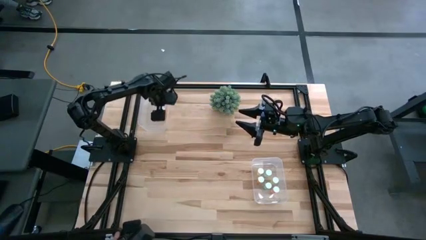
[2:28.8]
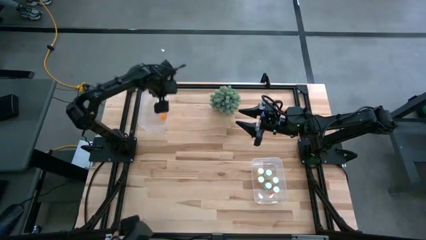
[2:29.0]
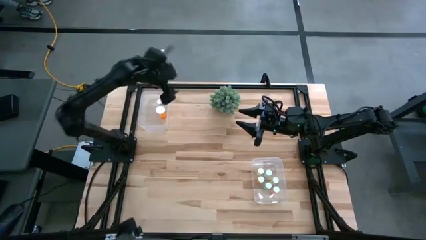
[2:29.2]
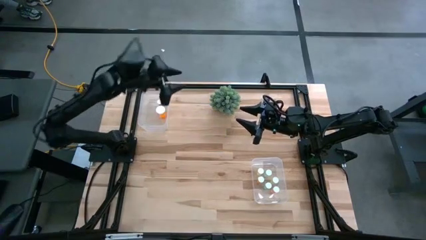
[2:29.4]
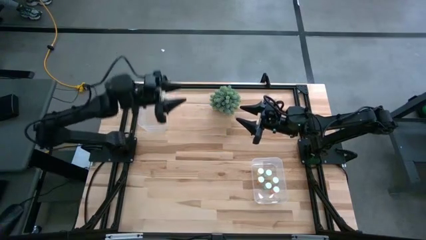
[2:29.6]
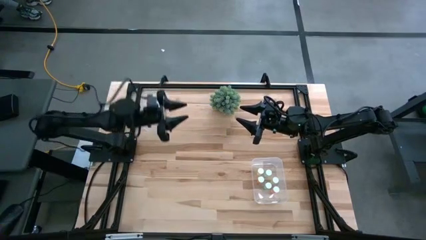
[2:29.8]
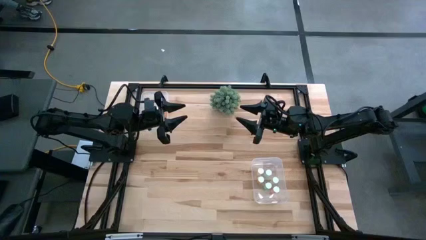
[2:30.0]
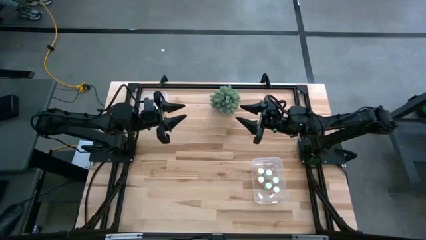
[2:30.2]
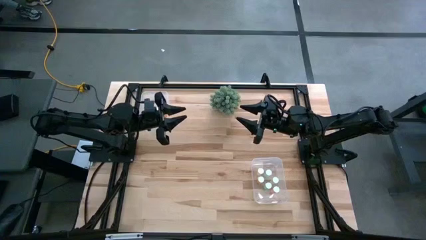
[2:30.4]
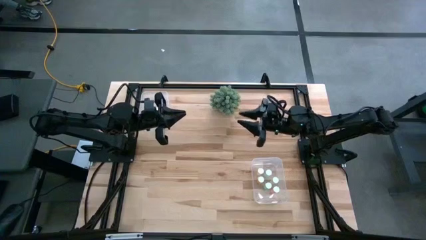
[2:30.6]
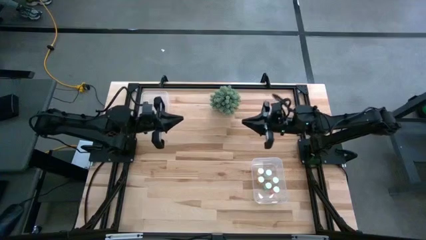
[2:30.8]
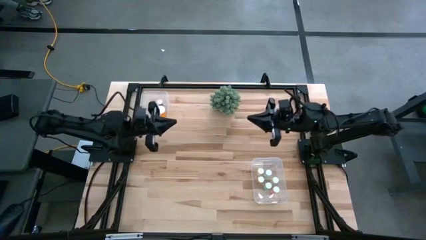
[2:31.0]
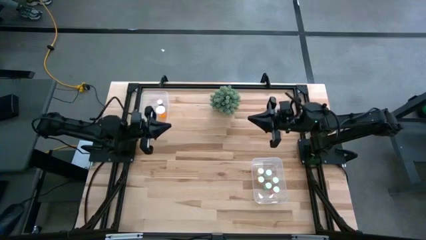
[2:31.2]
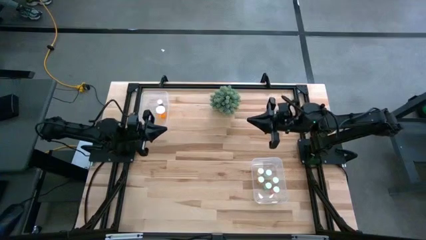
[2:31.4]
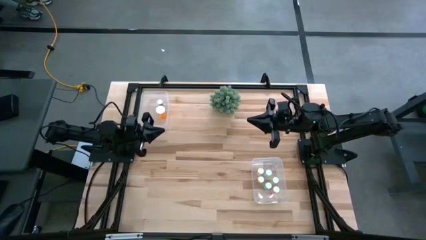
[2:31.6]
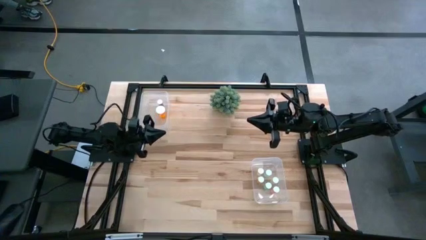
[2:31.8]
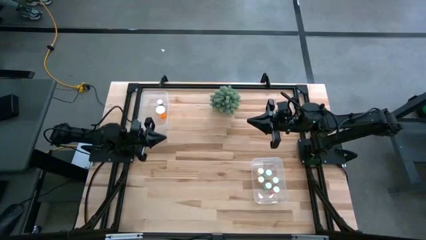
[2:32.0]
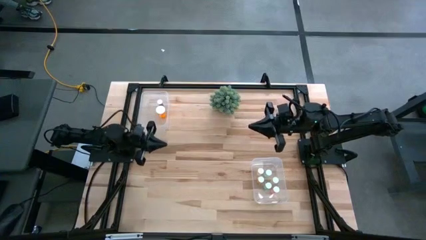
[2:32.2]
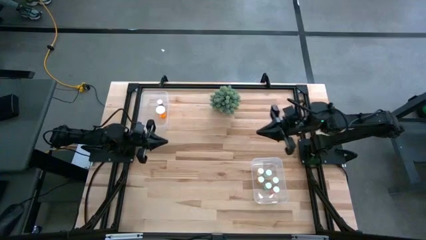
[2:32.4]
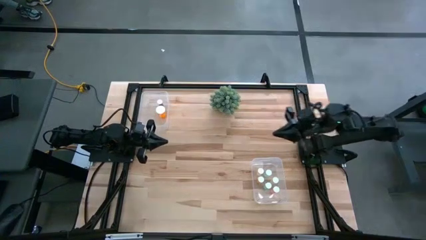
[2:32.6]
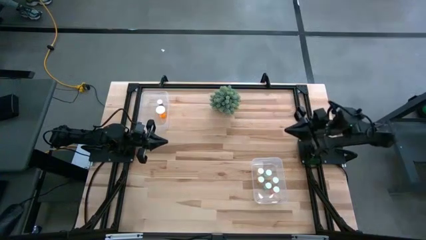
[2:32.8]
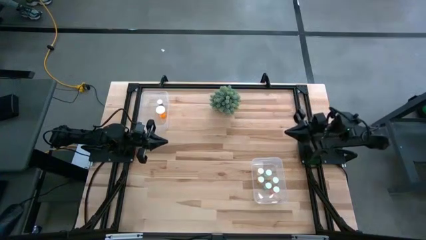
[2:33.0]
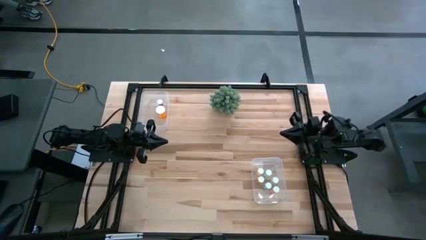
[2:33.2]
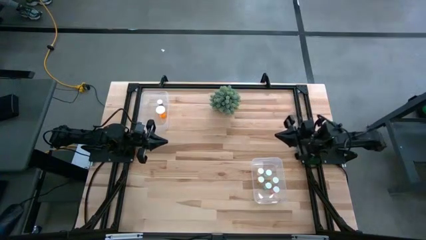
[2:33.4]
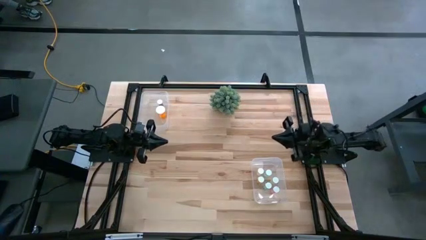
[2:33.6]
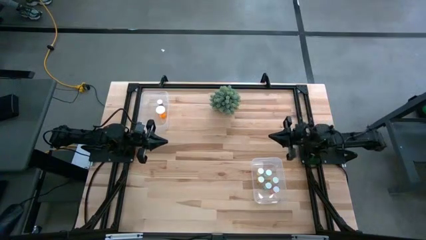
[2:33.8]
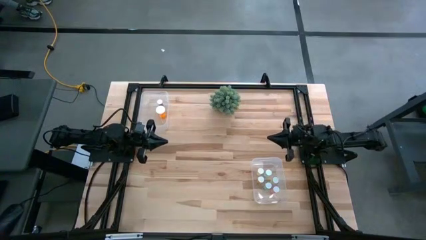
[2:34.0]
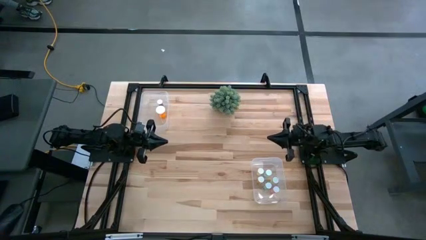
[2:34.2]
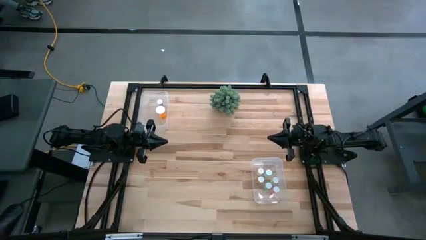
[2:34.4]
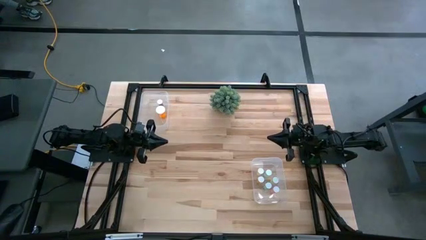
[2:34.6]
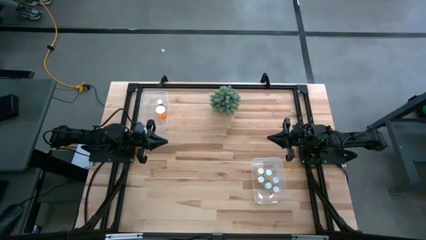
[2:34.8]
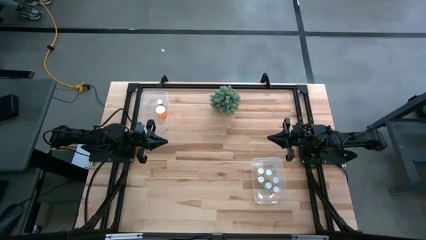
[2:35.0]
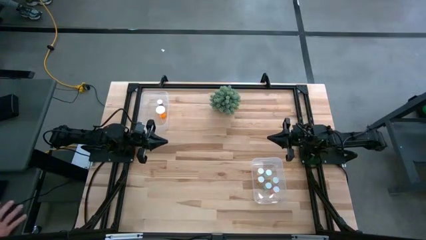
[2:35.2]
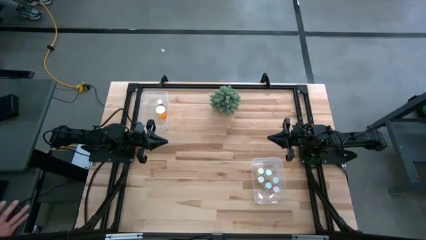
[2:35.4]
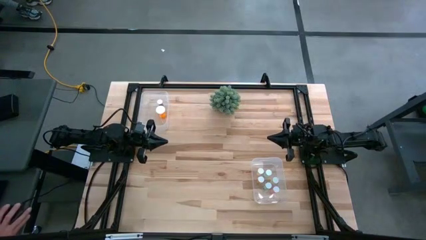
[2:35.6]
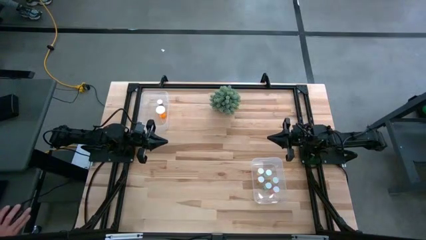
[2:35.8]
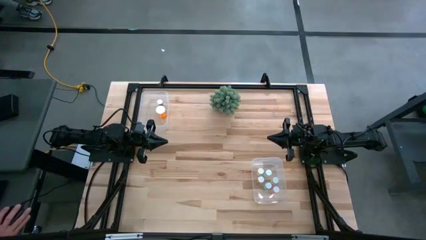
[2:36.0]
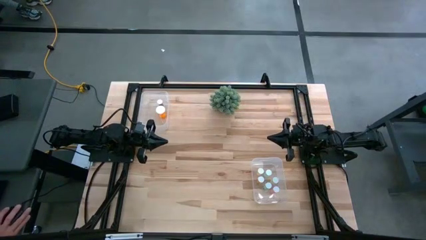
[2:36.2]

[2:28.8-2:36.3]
Task: Pick and place medicine bottles into bin by pill shape (circle, oval)
Return to Home Position

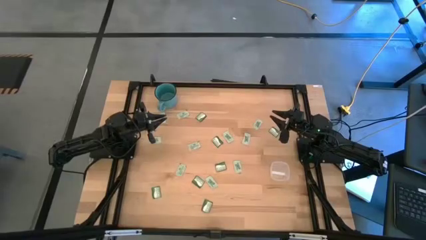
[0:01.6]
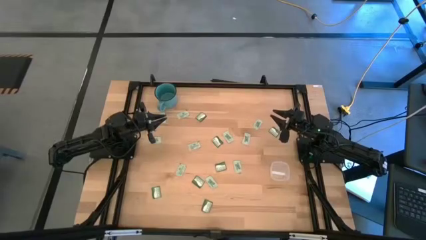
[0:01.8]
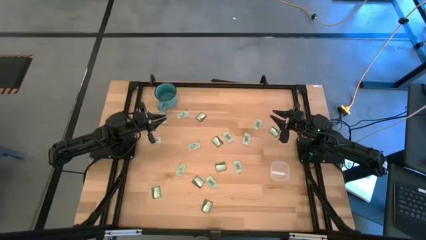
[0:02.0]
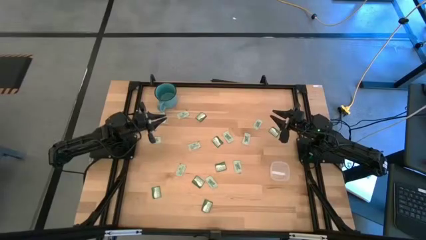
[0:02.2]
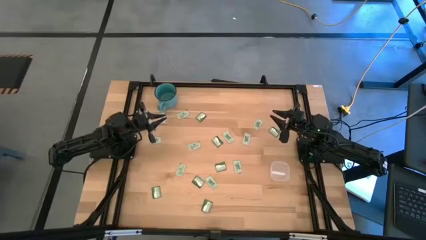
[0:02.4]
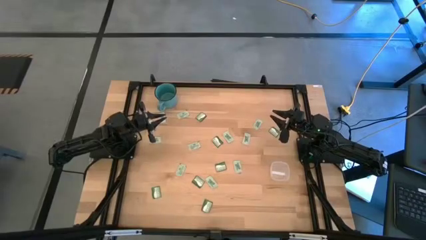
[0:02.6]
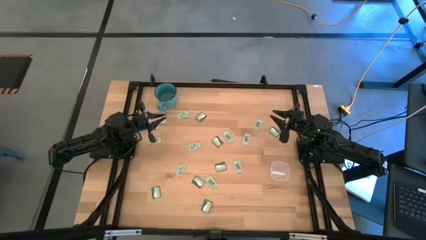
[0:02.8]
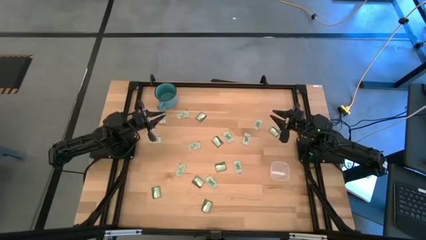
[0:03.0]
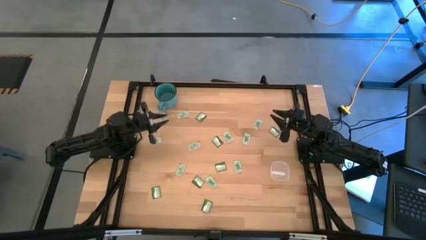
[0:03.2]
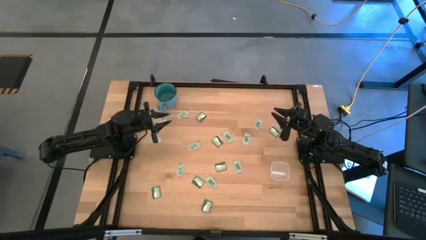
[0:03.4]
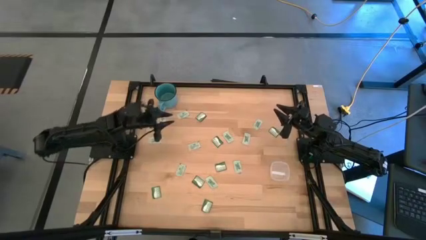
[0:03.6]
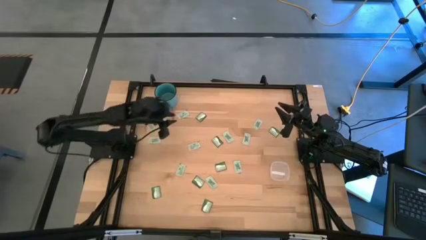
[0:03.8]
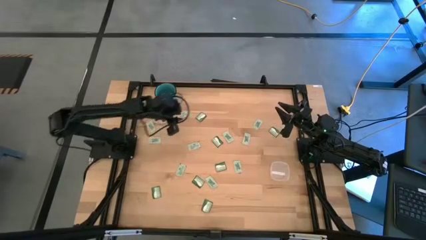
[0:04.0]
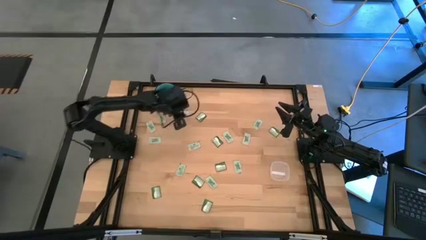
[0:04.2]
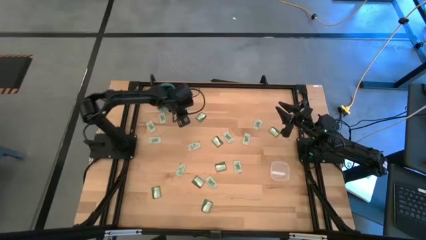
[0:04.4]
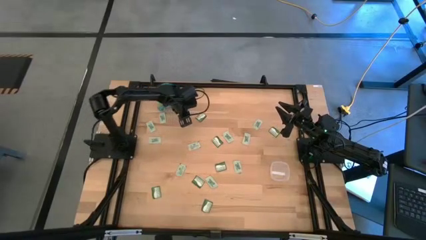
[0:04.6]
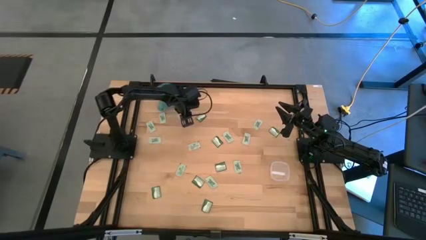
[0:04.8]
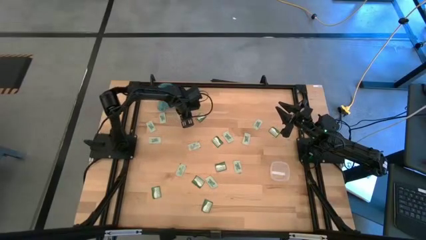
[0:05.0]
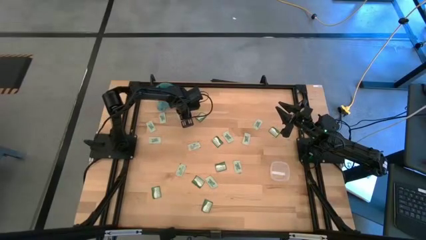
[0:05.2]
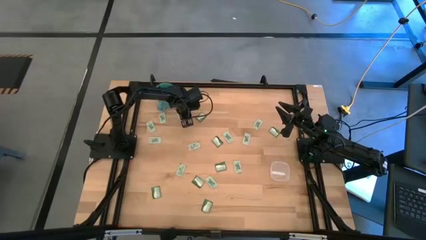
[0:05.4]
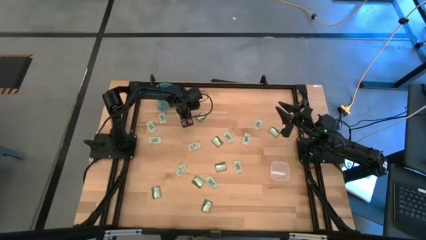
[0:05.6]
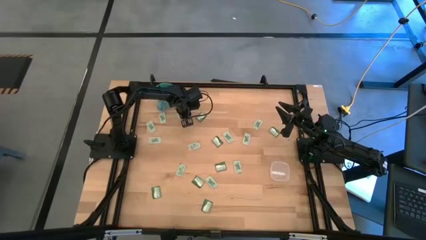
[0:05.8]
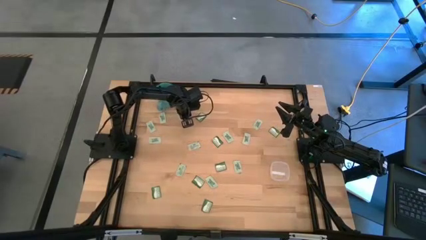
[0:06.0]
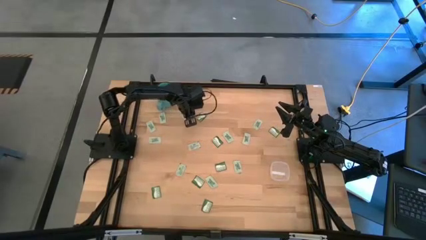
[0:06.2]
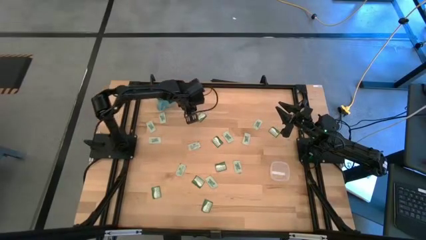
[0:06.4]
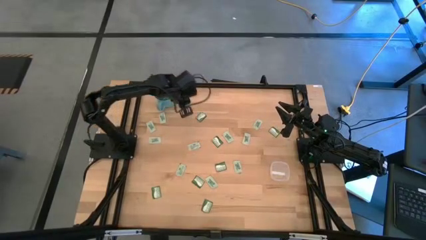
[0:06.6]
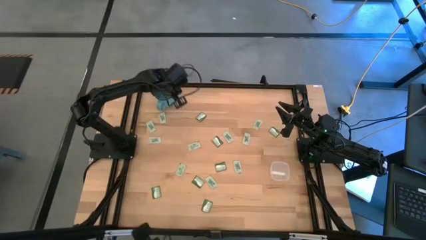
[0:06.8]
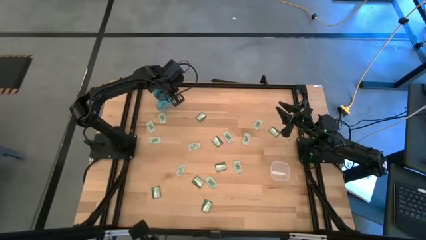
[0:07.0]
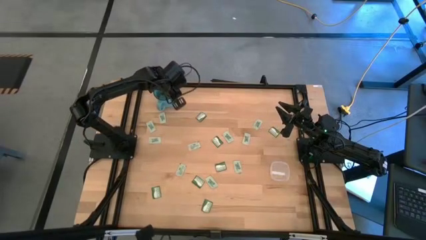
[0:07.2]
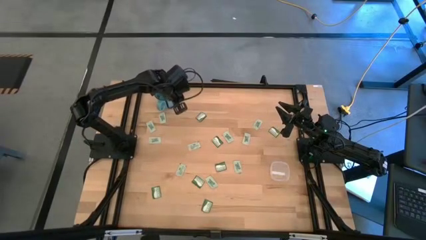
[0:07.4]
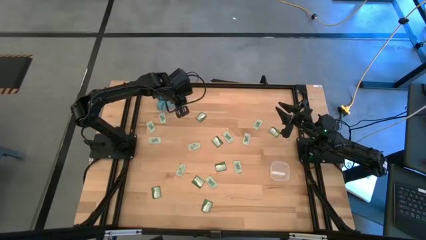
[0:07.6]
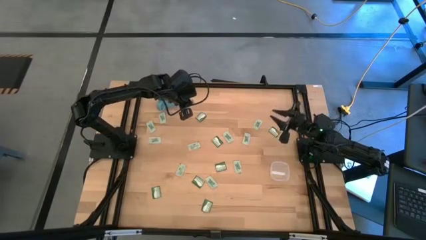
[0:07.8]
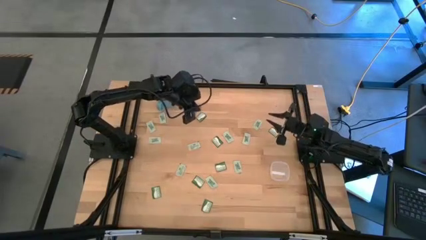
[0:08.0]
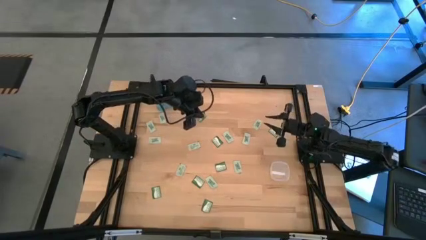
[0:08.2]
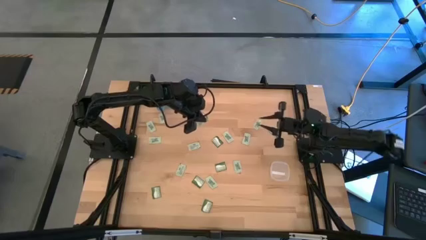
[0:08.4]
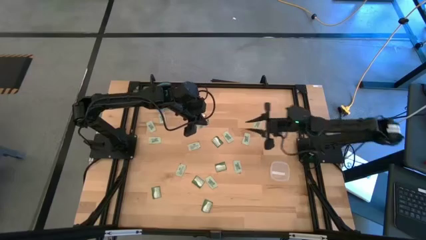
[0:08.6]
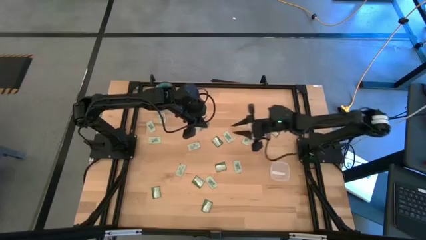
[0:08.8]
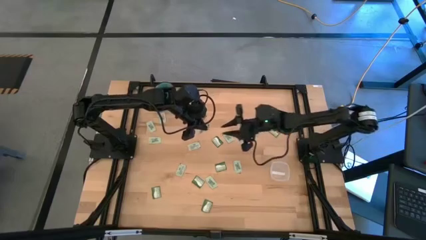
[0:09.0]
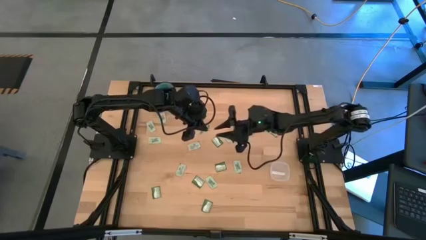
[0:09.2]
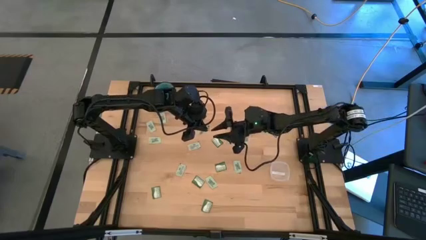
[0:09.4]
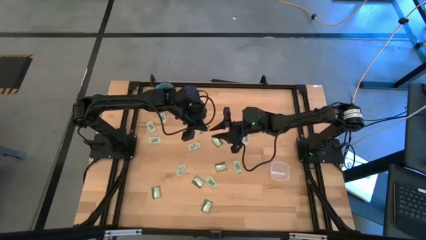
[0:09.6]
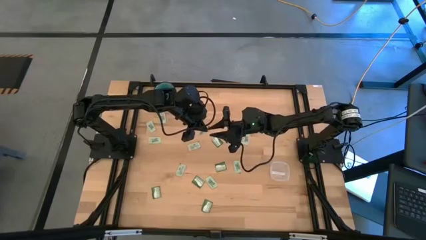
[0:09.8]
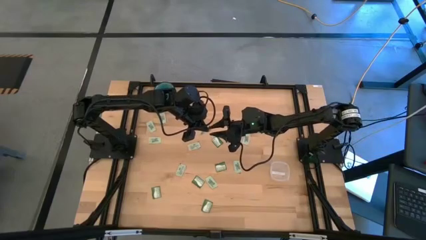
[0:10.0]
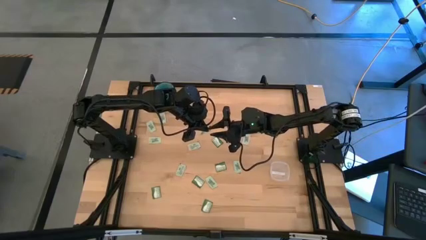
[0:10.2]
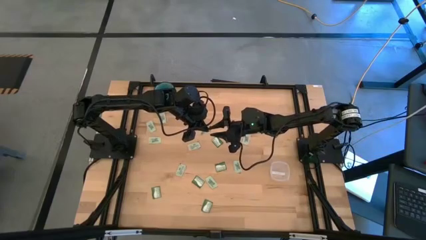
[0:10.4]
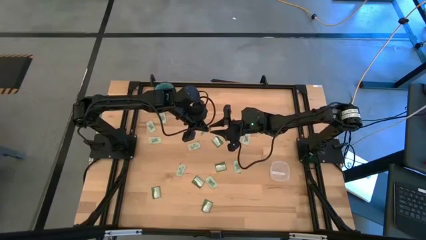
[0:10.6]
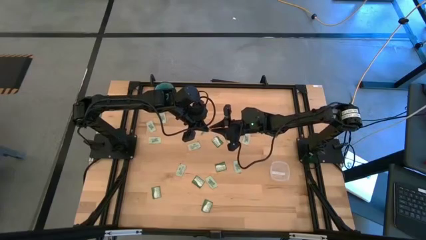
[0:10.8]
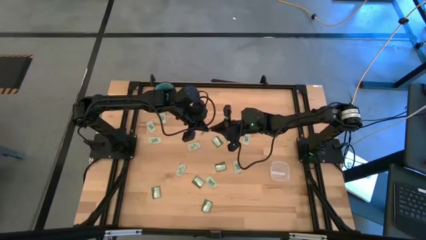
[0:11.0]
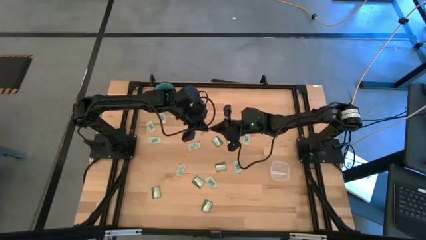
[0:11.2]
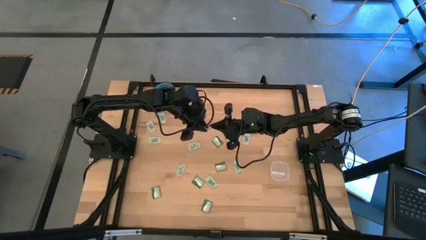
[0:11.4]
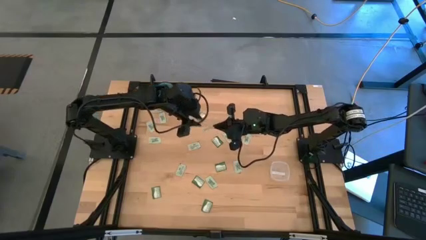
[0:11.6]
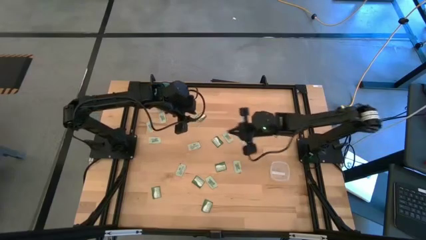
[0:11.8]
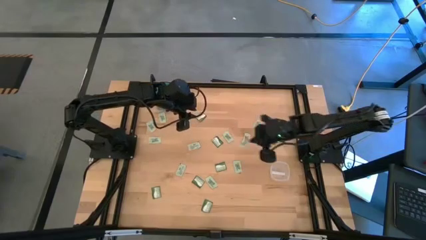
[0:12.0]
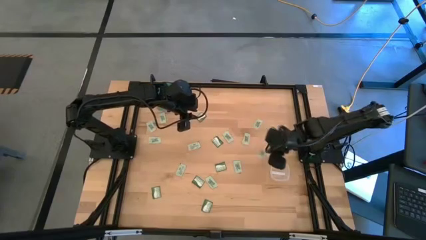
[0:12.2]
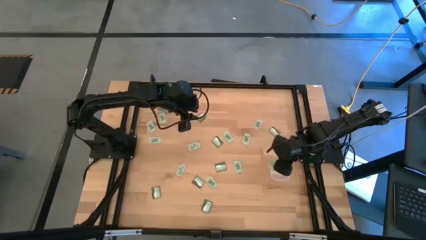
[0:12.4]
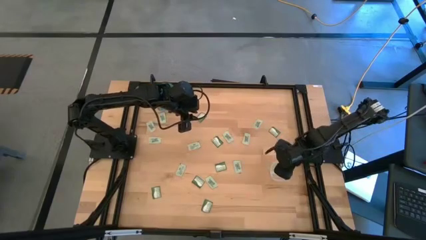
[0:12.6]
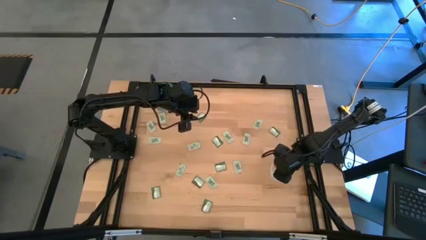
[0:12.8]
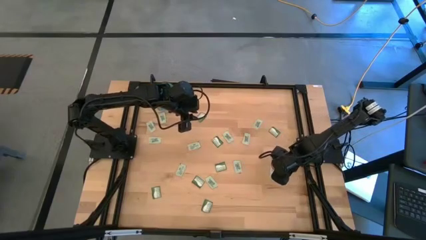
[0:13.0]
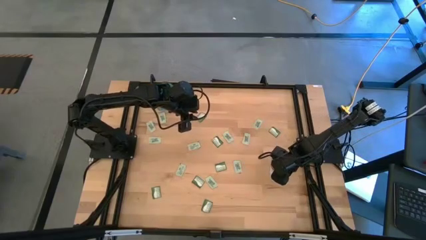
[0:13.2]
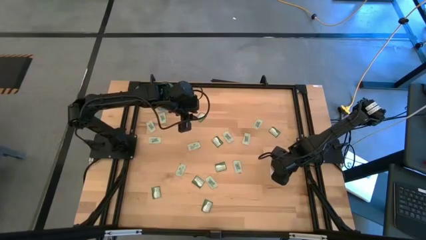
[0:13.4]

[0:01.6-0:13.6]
Task: Pick and place items into bin
Put the white stevia packet into the transparent bin
